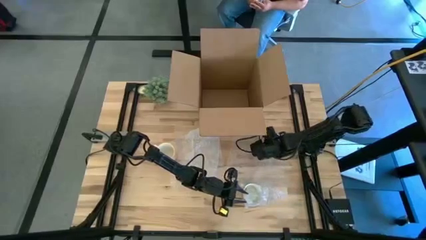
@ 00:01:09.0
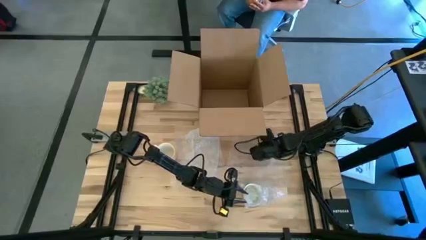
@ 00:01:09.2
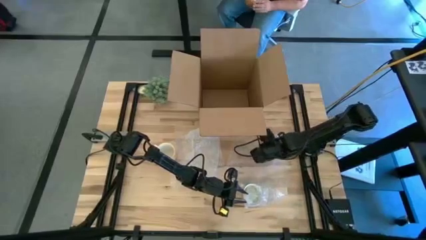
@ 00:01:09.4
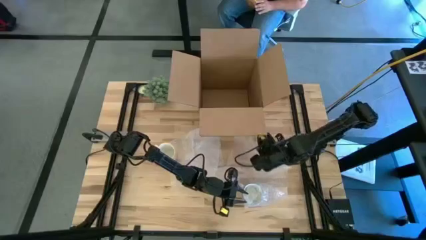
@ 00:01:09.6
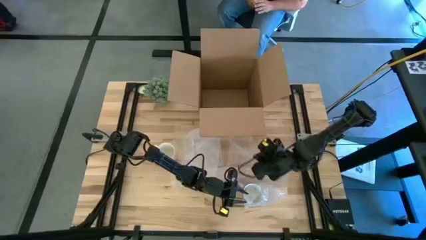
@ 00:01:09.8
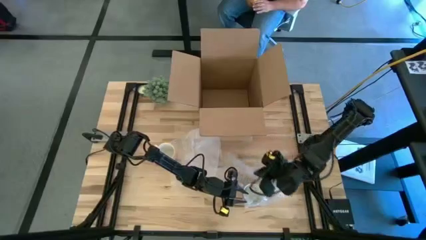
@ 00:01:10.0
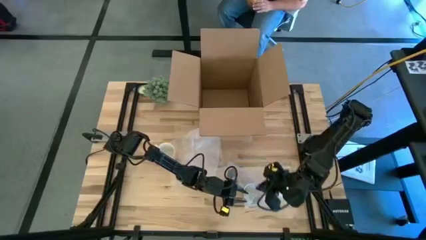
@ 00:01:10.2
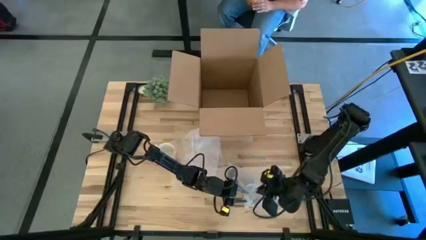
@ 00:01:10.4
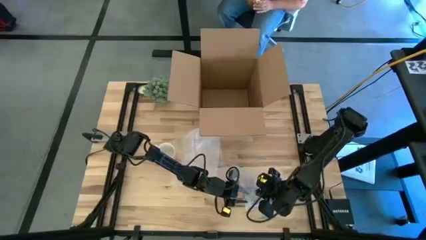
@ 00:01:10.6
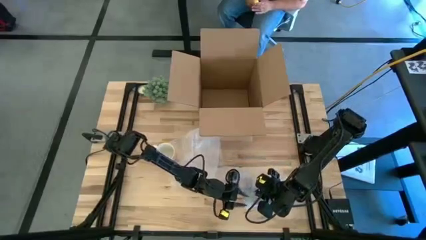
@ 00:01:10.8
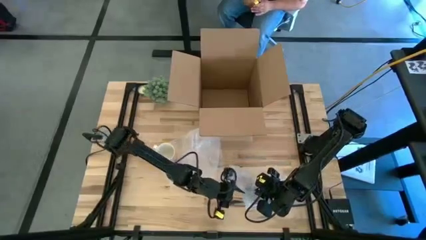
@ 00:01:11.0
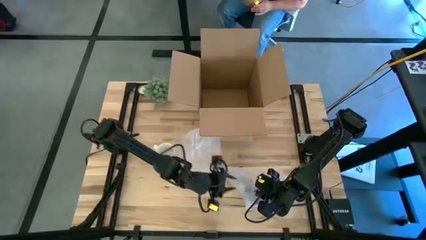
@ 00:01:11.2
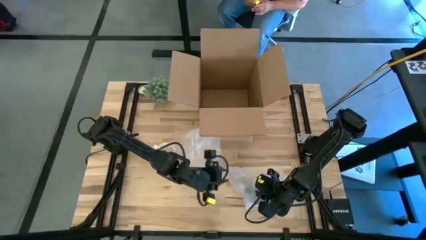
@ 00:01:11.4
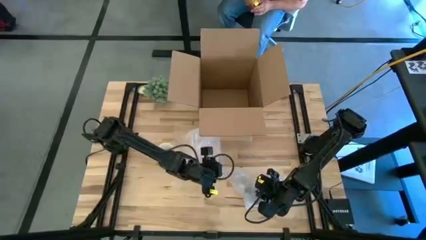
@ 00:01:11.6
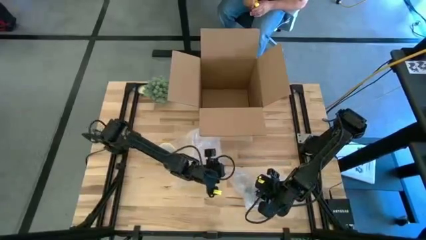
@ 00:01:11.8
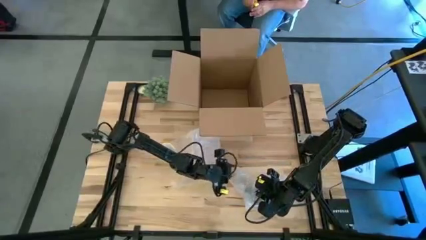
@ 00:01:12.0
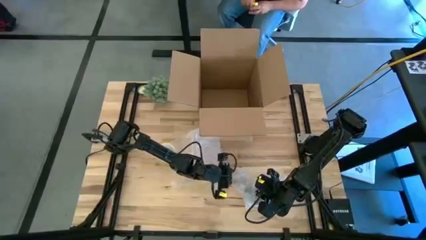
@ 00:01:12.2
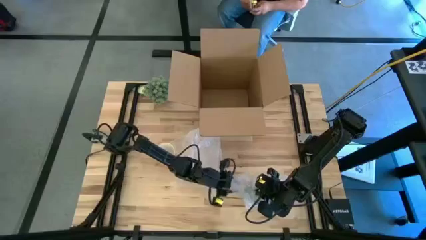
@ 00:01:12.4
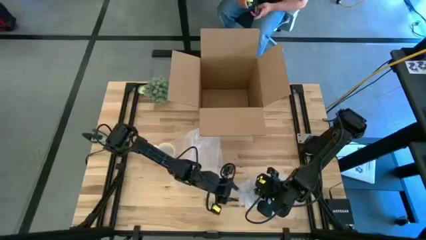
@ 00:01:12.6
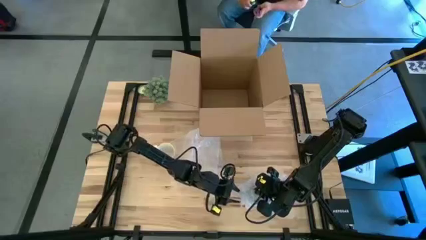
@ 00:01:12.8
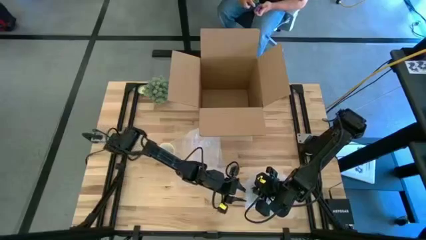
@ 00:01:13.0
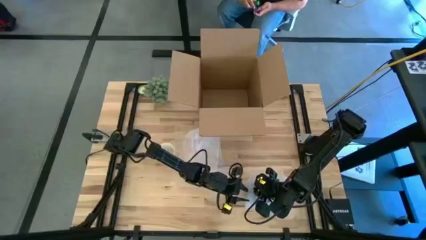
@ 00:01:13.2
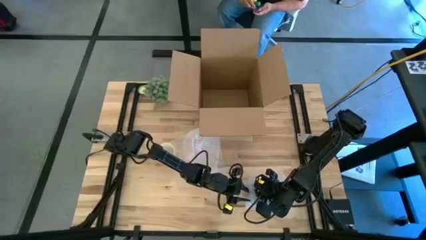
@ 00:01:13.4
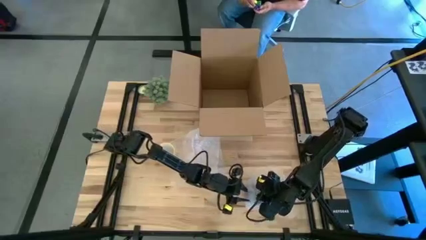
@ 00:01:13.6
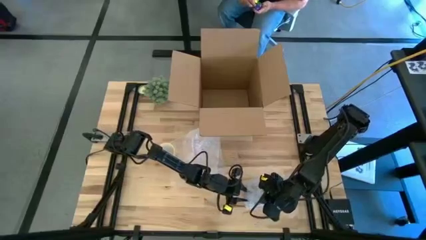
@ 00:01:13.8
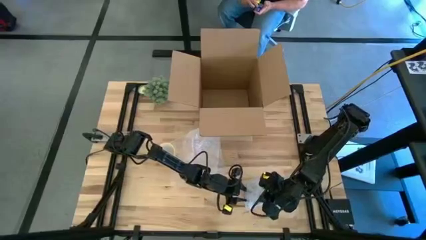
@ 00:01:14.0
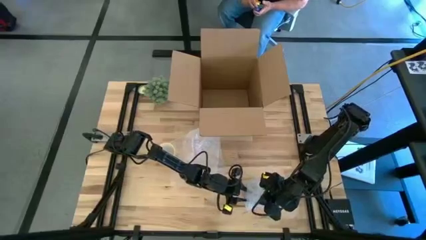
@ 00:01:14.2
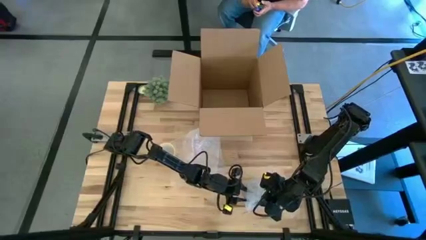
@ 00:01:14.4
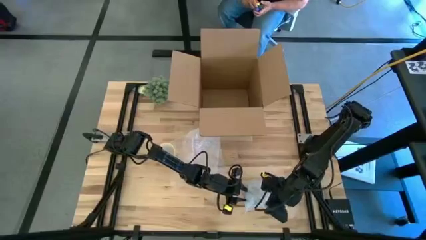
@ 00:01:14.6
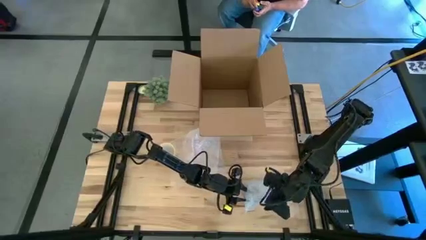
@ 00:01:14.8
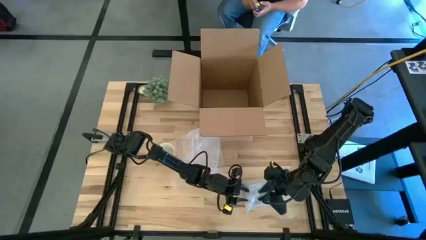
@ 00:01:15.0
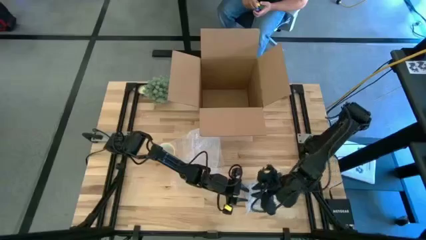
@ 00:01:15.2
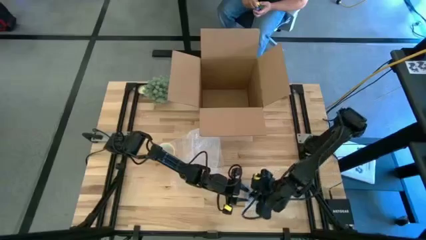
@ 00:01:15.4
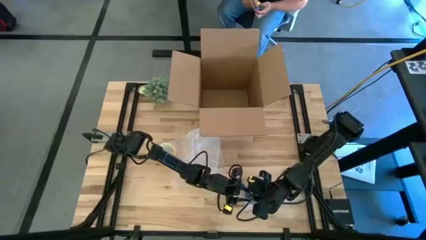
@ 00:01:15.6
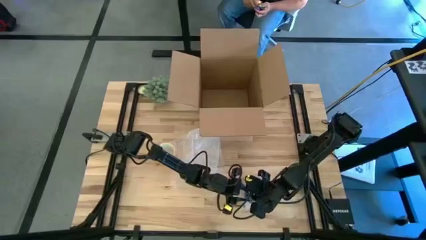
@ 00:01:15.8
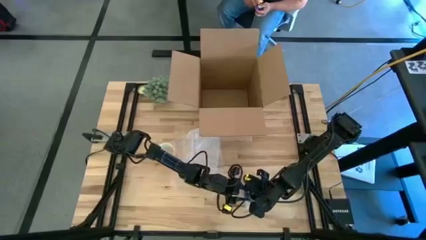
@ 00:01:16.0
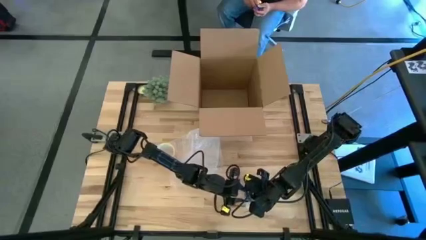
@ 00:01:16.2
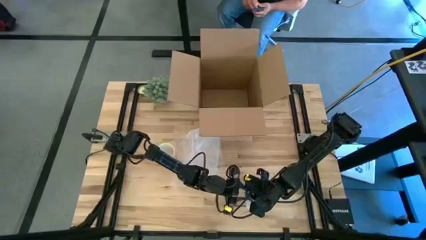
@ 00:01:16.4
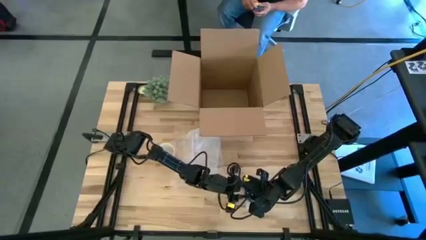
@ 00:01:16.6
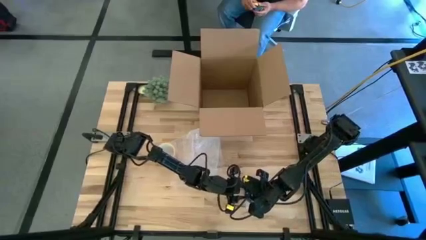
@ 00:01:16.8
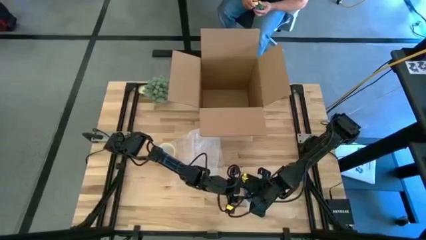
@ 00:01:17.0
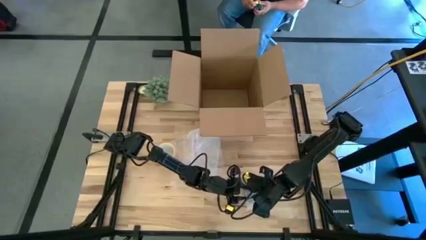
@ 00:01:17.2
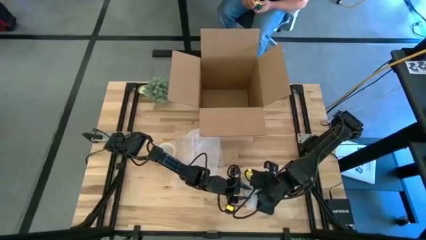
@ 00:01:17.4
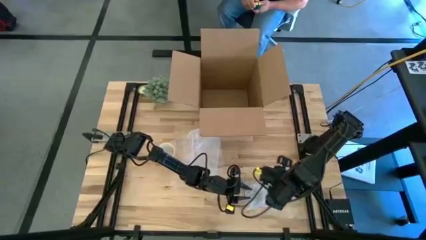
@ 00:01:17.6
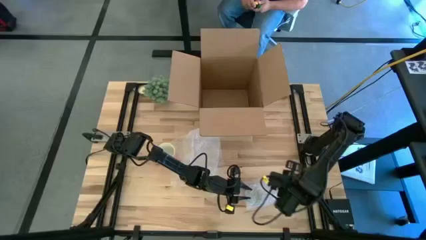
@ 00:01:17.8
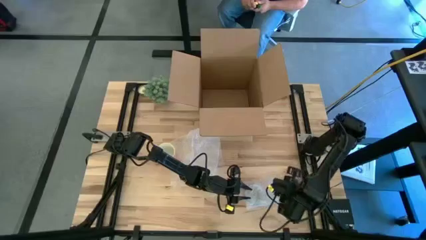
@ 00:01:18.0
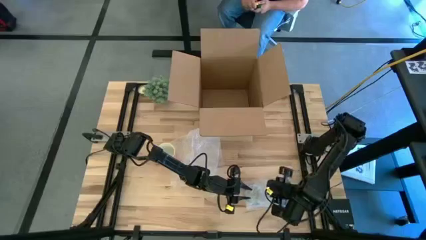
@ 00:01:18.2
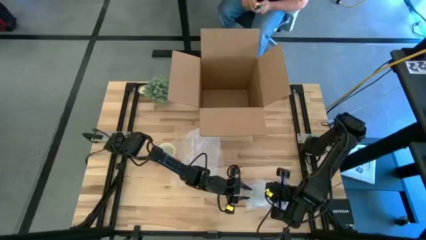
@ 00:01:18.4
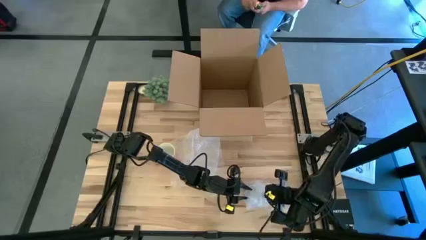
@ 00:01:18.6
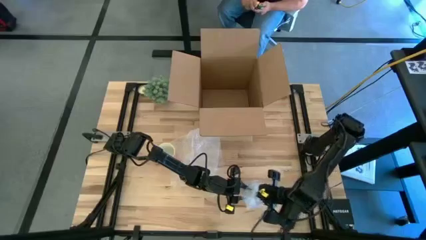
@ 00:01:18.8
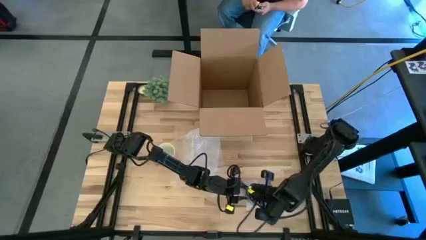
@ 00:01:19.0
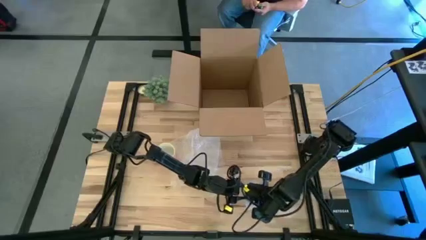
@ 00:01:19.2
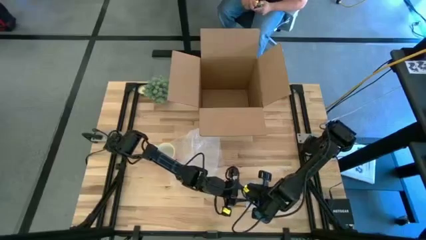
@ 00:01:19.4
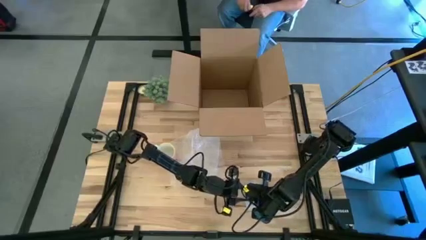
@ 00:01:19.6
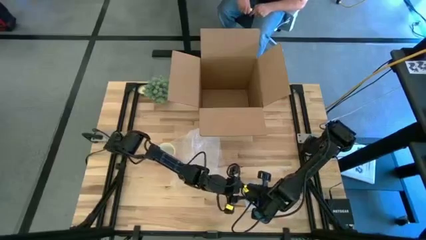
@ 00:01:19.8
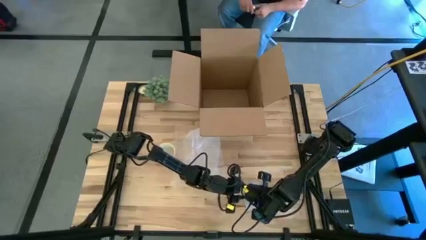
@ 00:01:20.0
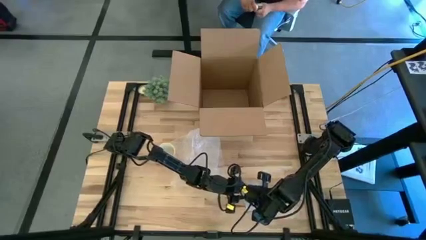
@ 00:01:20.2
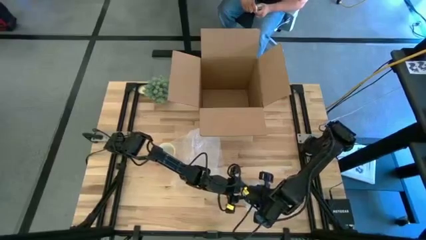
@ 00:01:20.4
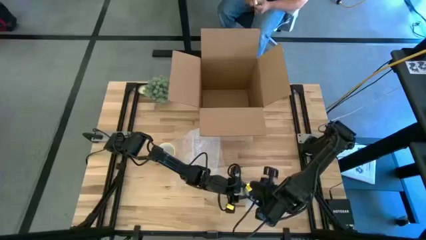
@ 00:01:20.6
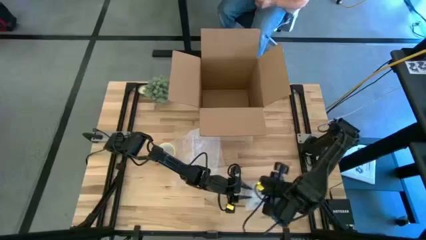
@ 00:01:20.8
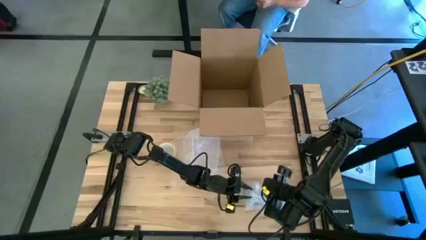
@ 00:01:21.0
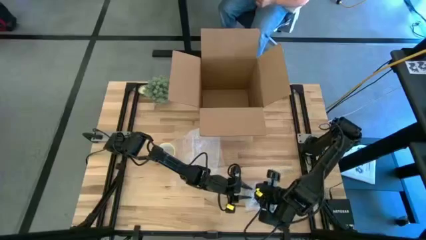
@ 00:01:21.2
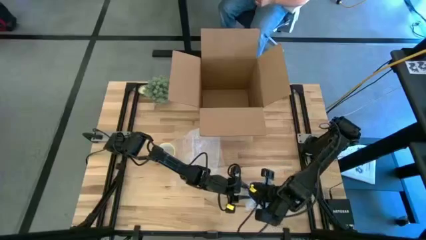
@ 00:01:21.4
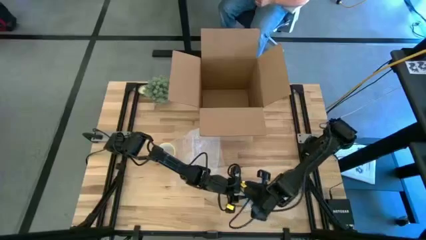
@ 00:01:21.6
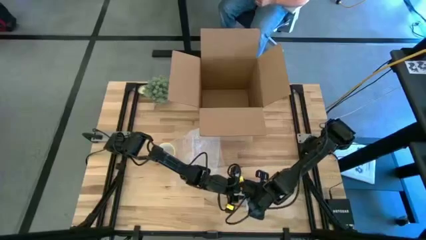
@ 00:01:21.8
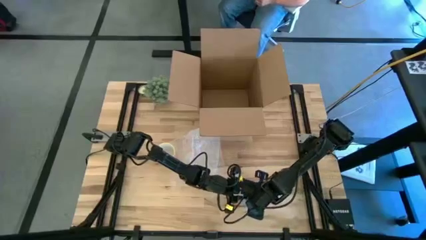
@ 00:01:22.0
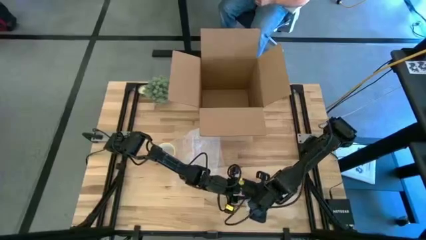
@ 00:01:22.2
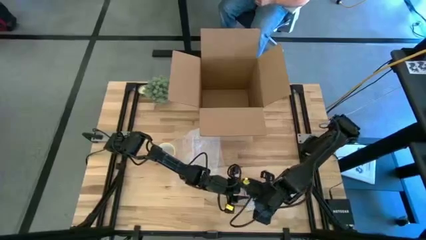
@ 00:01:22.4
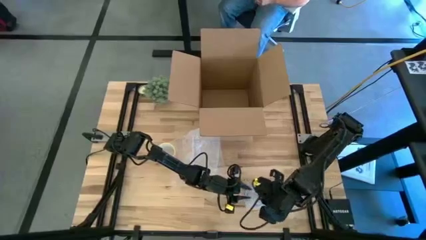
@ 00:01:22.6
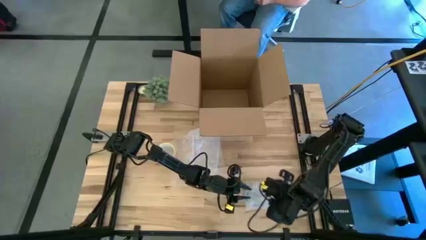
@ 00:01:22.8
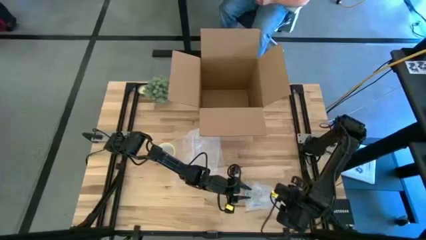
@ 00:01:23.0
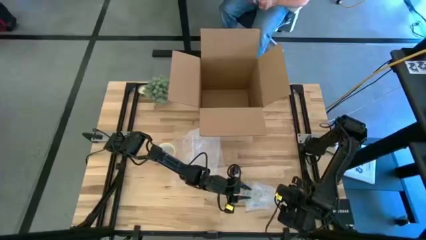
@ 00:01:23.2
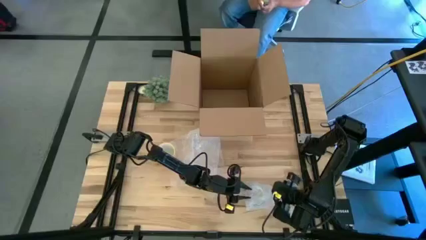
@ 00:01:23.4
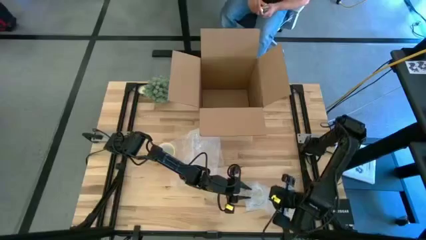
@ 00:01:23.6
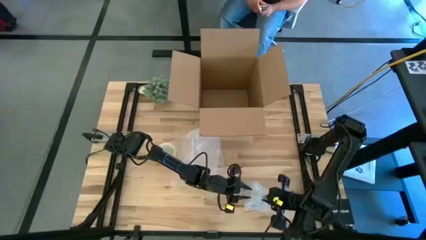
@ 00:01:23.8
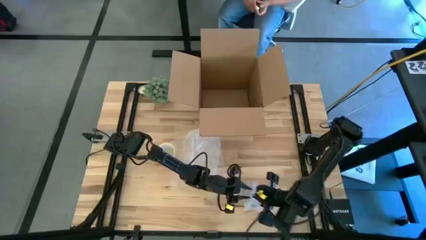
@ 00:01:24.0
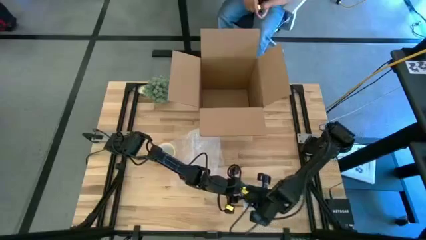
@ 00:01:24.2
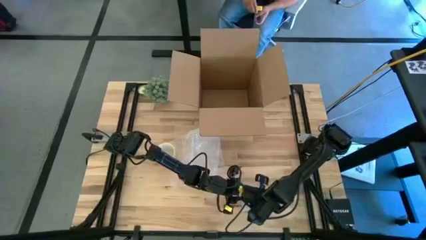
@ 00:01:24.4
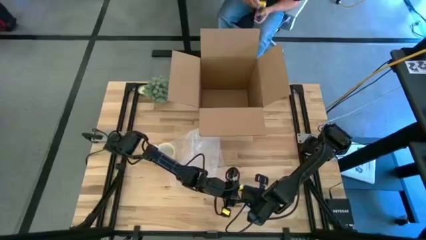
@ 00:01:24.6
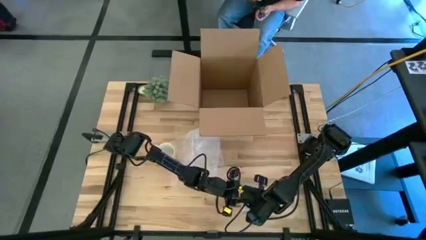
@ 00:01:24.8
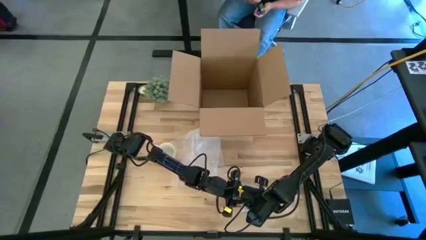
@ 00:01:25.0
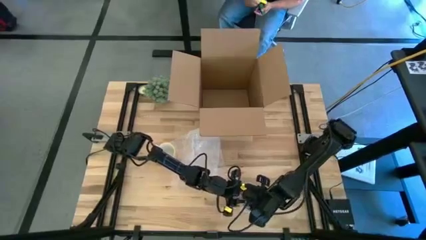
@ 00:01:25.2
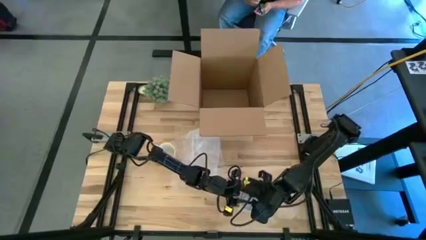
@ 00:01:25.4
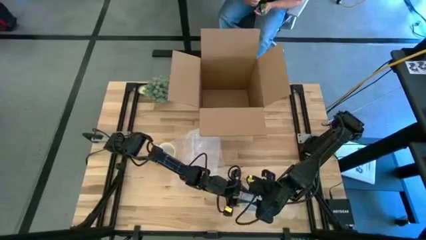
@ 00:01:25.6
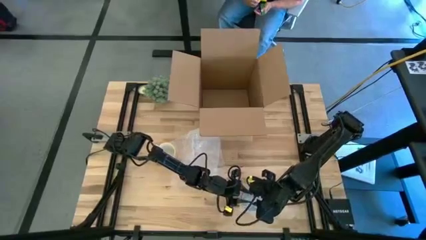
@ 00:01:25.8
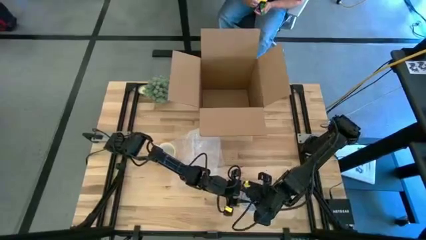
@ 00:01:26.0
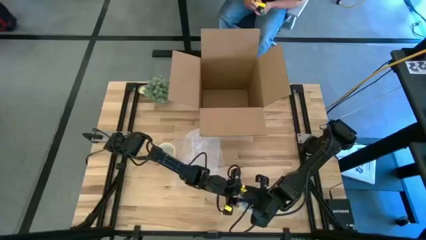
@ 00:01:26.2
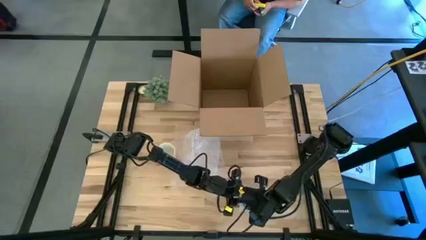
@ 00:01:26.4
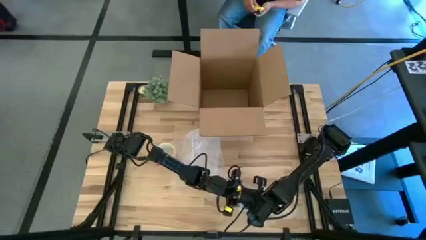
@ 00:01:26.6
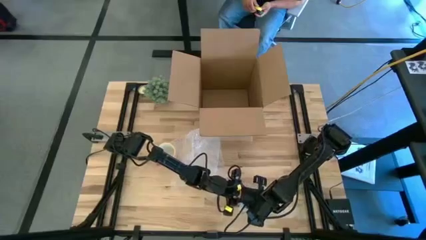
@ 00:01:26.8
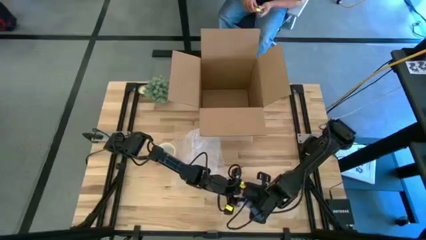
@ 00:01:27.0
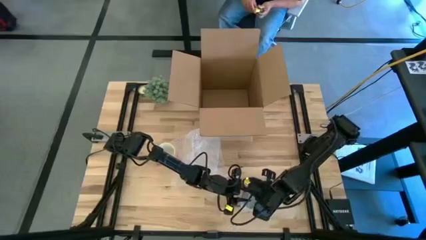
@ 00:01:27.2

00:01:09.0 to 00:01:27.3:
Task: wrap mug
Wrap the red mug with the right bubble wrap
